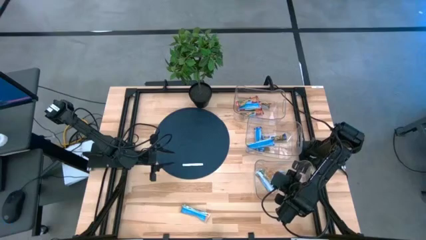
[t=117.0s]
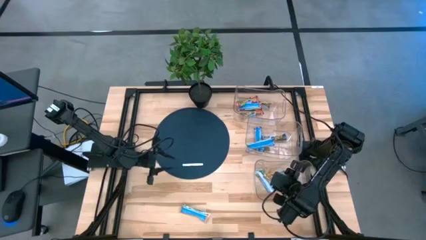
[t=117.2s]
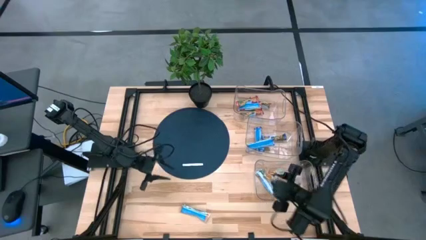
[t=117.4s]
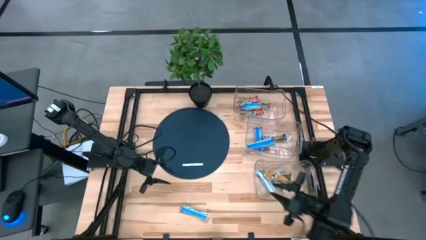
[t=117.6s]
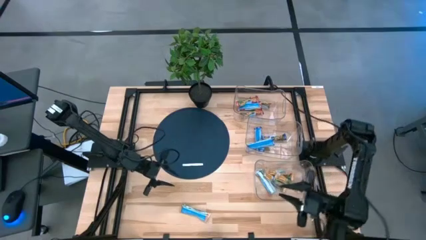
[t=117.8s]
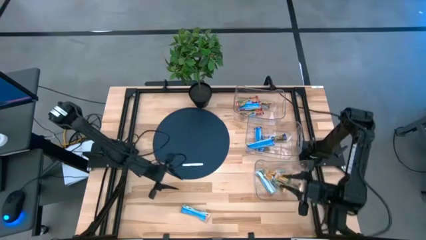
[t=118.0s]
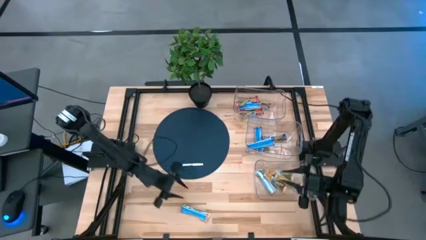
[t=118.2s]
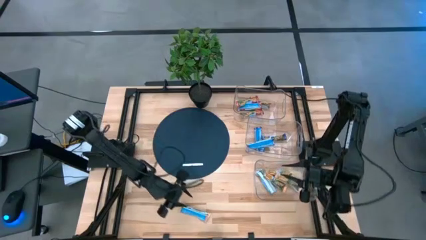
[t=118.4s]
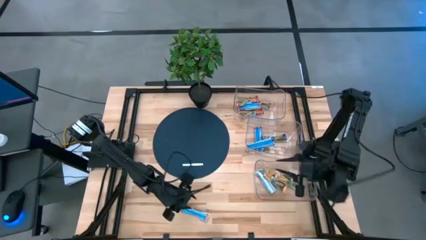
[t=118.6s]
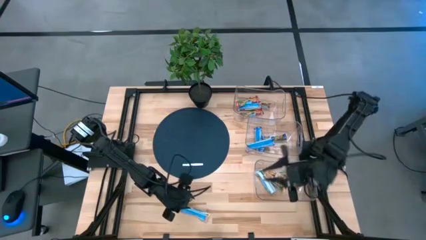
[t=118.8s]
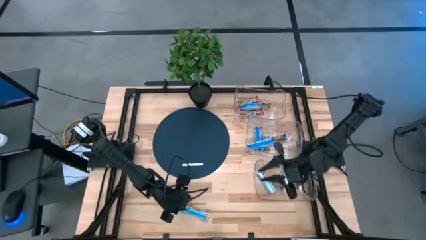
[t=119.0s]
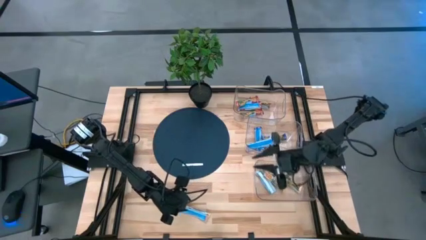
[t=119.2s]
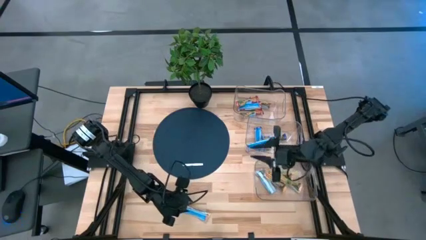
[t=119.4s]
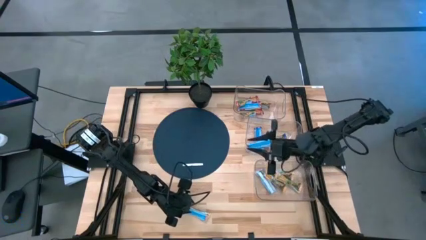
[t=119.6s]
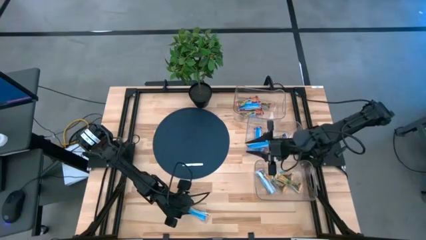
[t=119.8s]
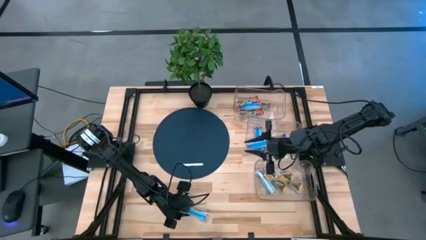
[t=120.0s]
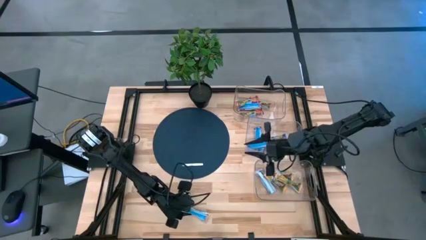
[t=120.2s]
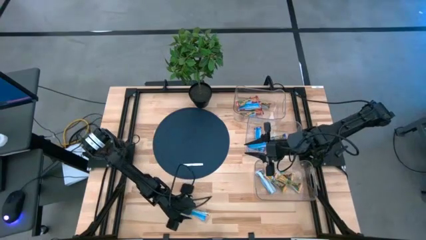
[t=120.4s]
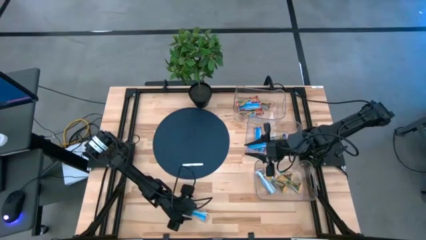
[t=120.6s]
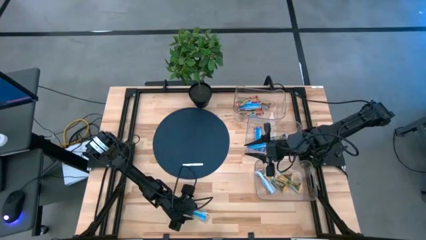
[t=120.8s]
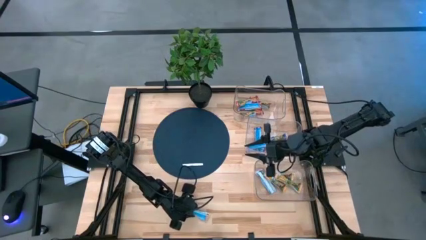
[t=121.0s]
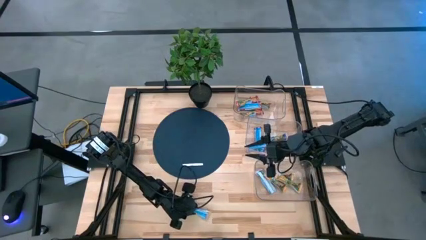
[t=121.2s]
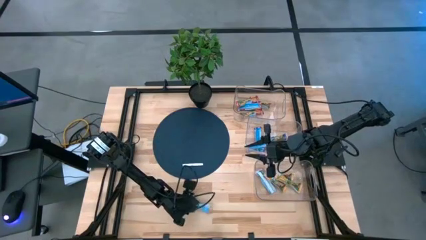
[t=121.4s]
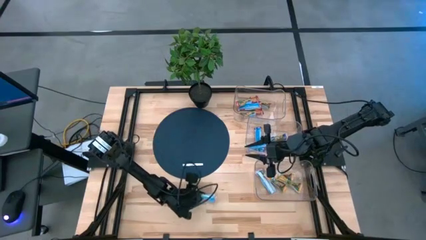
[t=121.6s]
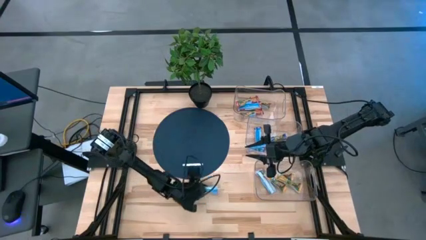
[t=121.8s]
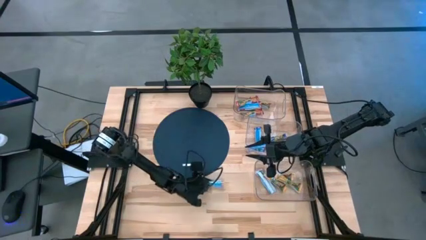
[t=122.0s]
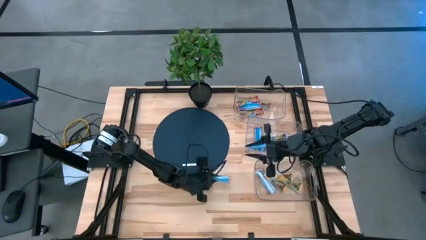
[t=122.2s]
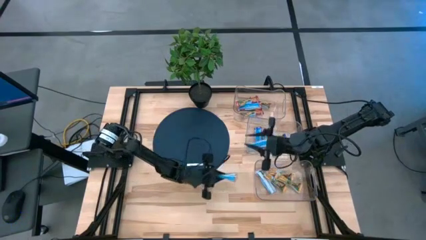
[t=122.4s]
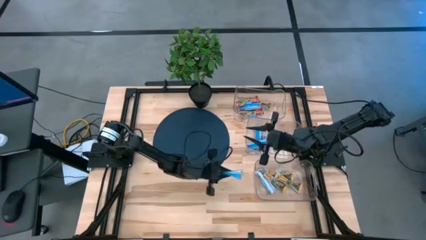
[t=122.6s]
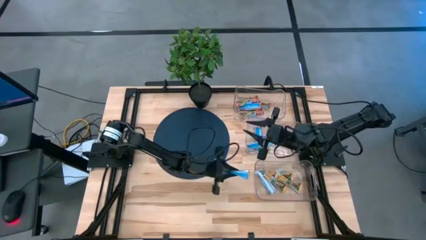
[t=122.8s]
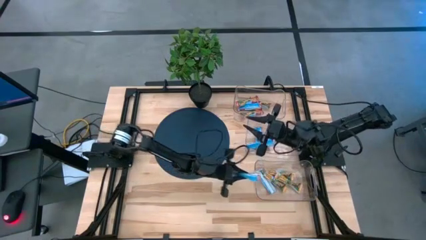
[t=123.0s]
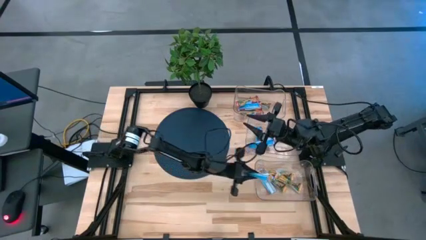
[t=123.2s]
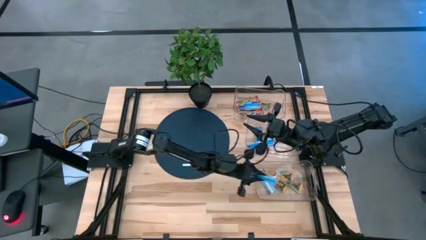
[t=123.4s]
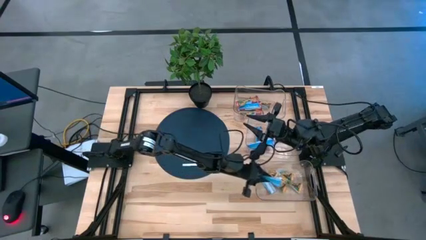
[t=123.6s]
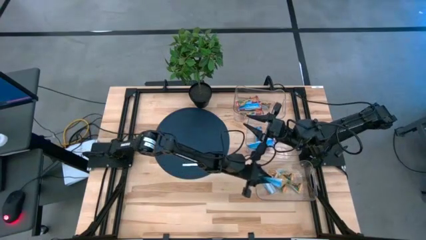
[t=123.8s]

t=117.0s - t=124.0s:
Task: Pick and place Granola Bars by type
Put the yellow granola bar into the bottom transparent bin

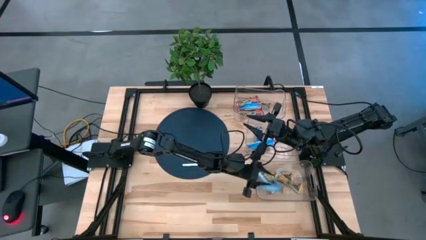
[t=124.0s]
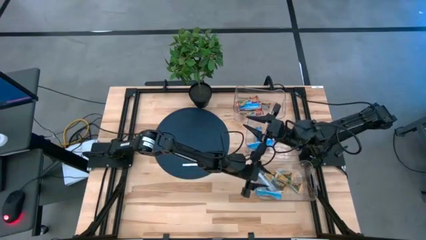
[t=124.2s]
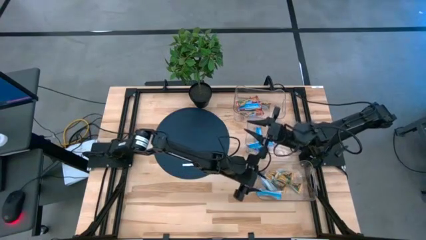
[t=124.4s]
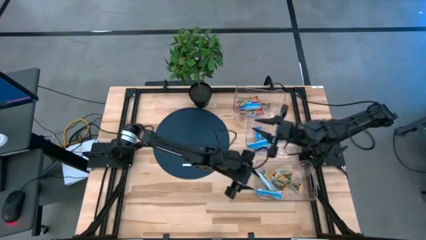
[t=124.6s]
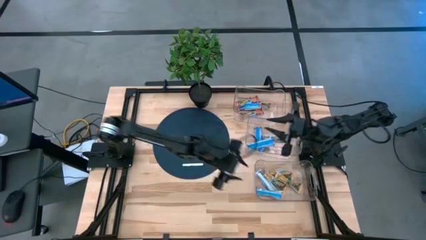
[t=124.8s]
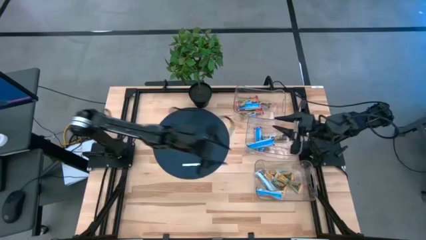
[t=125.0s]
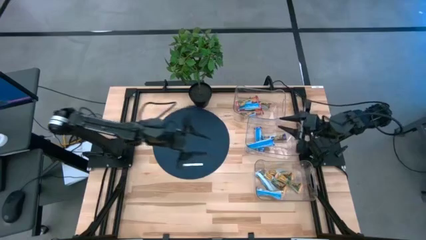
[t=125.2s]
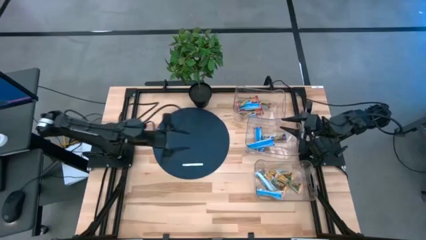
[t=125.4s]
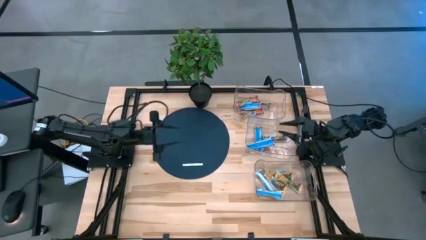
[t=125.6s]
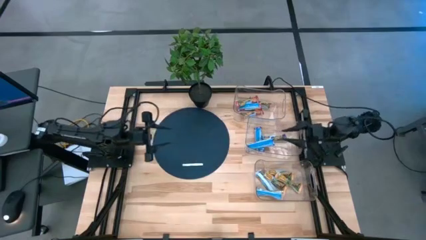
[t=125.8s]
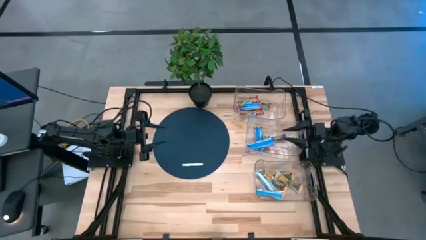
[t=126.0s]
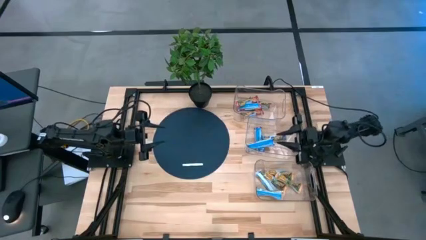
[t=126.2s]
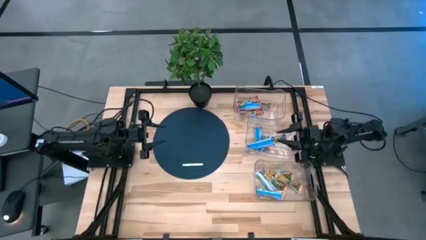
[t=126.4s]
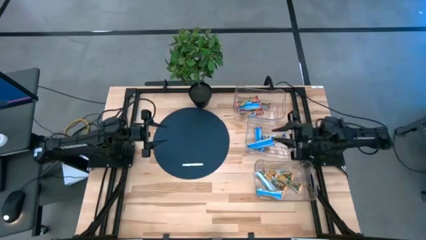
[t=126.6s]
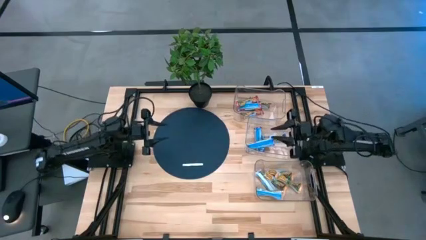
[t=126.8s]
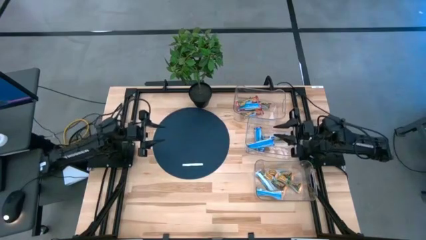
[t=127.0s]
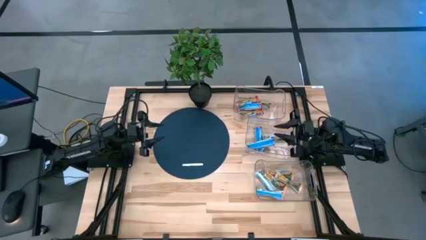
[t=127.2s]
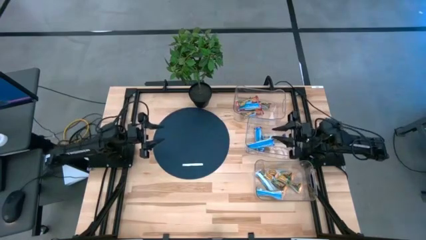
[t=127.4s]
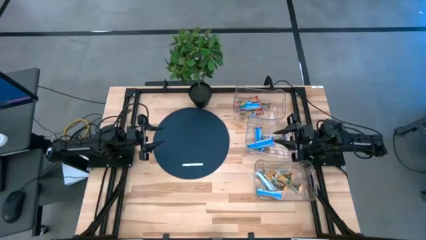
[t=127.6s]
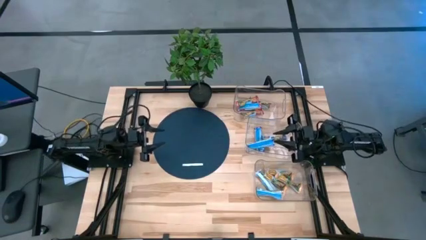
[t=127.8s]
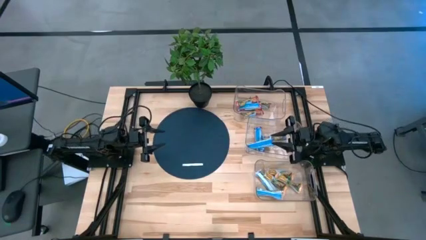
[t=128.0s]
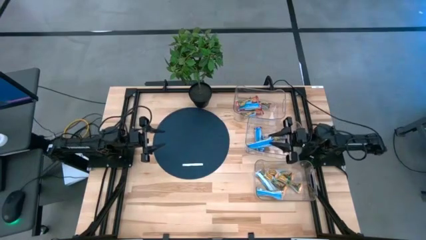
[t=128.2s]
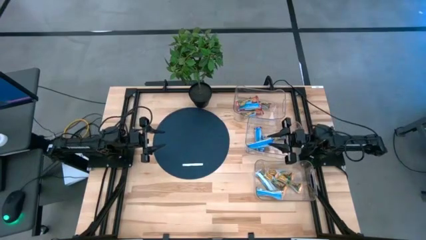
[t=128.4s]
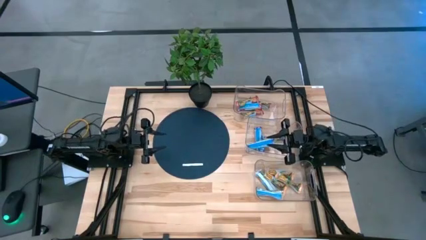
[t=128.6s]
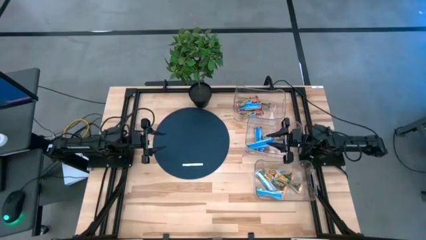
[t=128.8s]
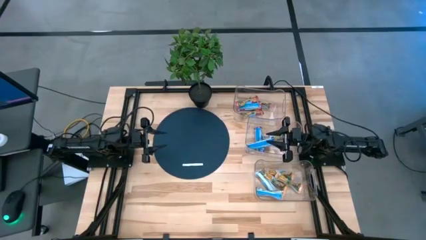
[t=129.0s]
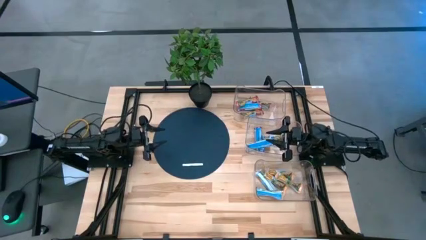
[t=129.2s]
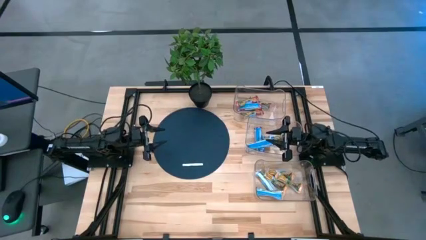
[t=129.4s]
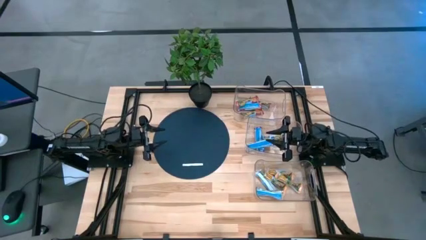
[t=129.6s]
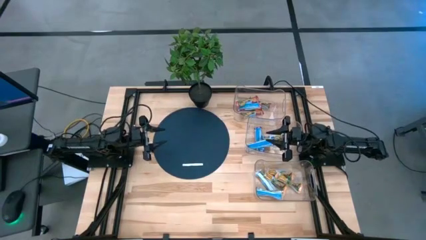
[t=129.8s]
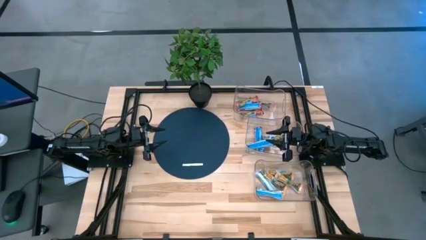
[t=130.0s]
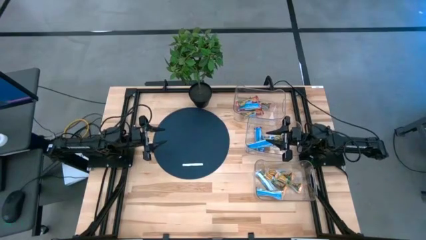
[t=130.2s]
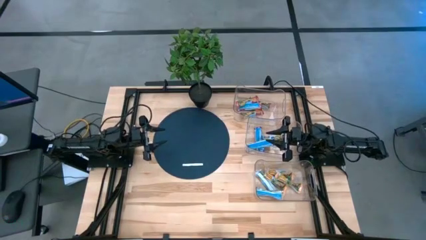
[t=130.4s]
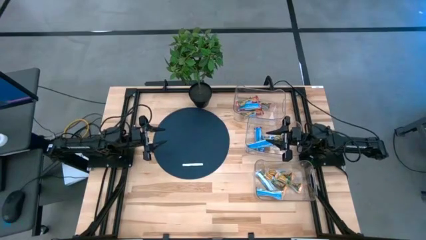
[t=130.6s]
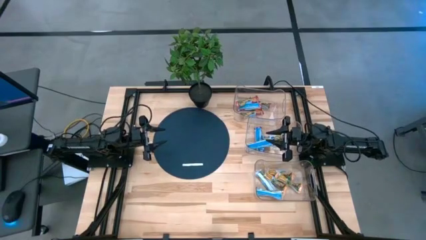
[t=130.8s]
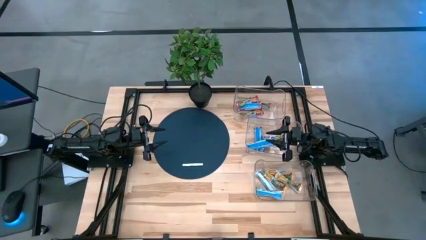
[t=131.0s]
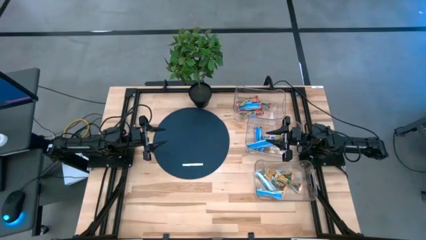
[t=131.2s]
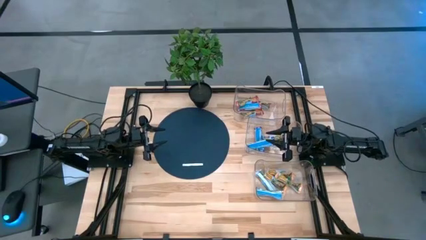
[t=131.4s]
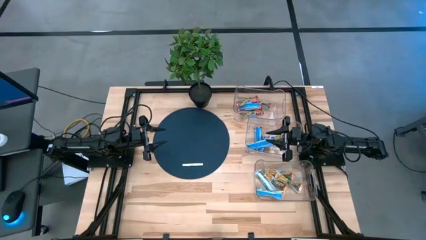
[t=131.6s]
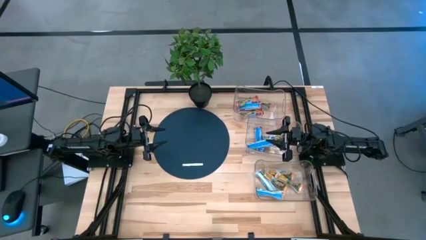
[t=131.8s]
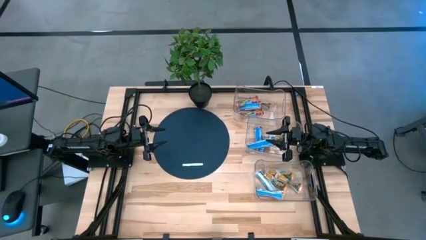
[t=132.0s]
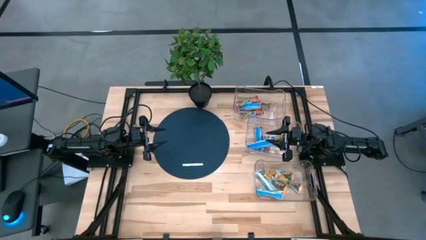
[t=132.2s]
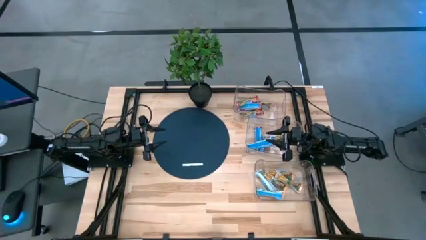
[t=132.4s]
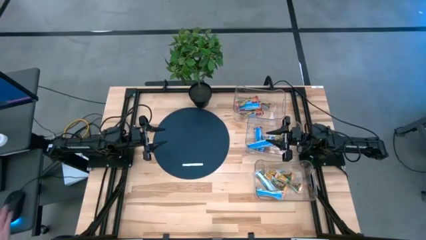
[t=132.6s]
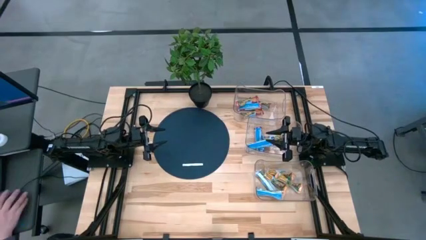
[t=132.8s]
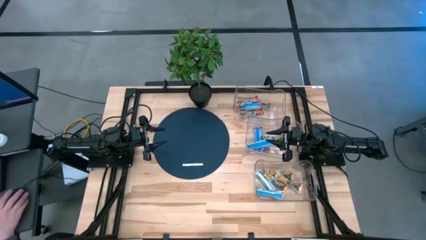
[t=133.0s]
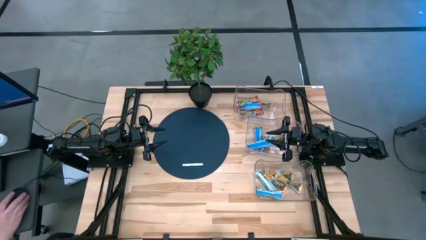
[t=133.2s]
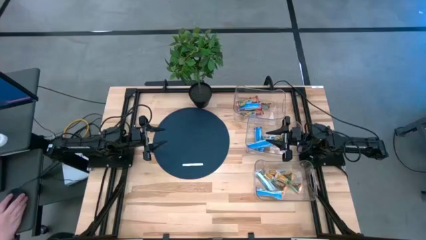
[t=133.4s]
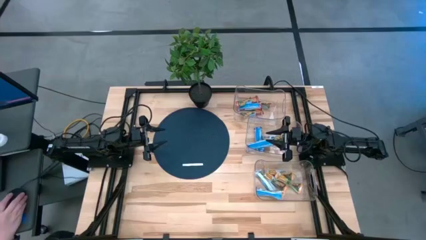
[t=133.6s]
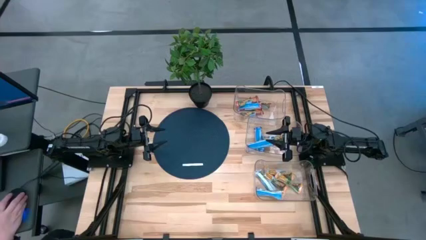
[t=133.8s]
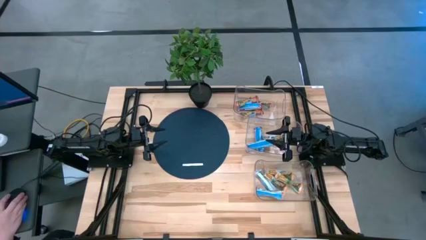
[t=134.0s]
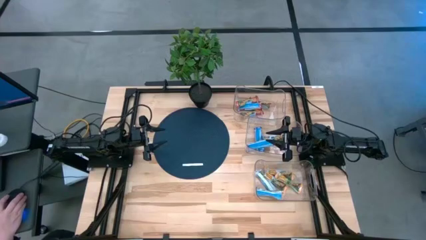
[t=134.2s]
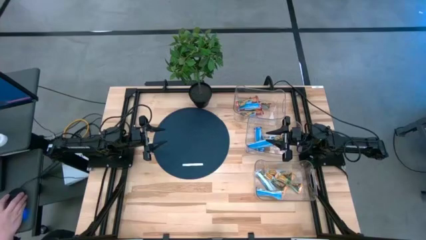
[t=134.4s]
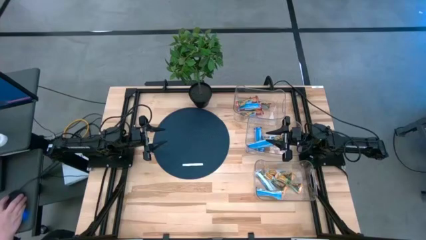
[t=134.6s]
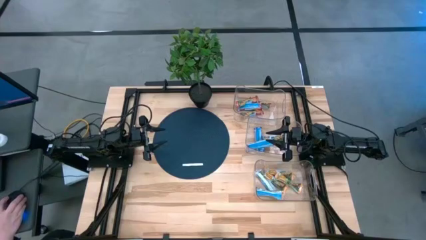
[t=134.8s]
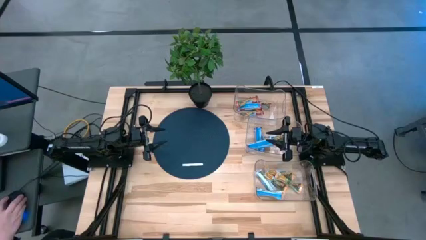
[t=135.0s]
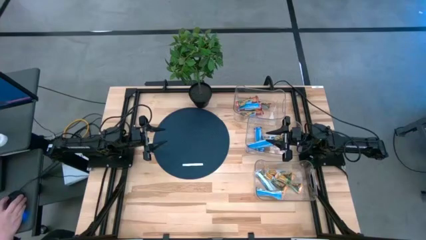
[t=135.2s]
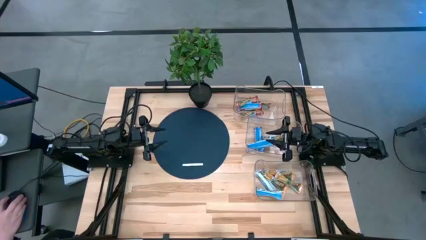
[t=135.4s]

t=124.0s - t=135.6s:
Return to Home Position
